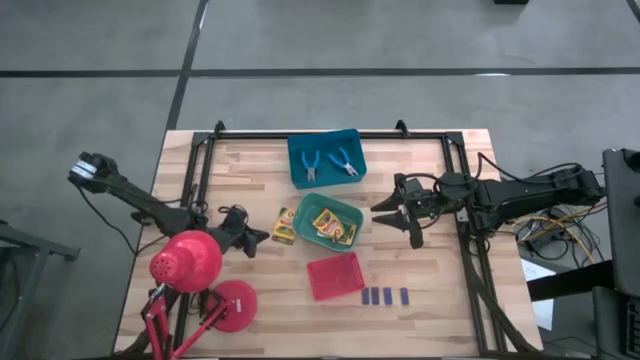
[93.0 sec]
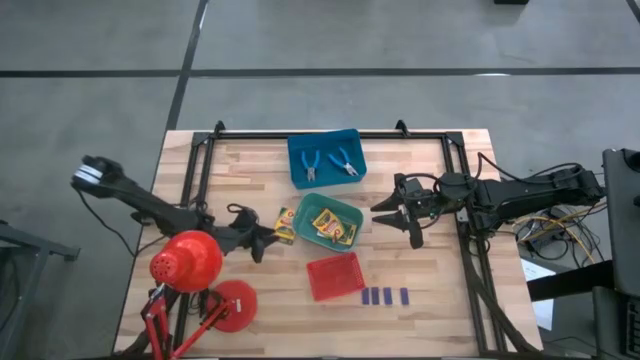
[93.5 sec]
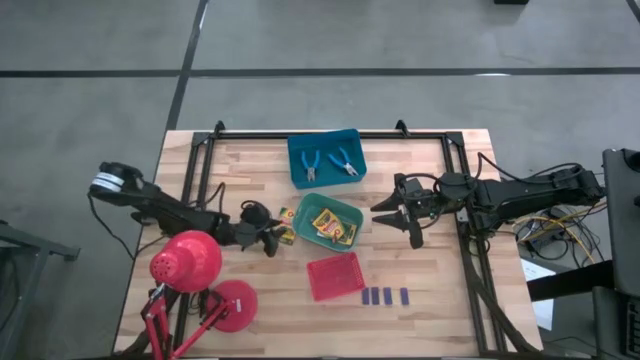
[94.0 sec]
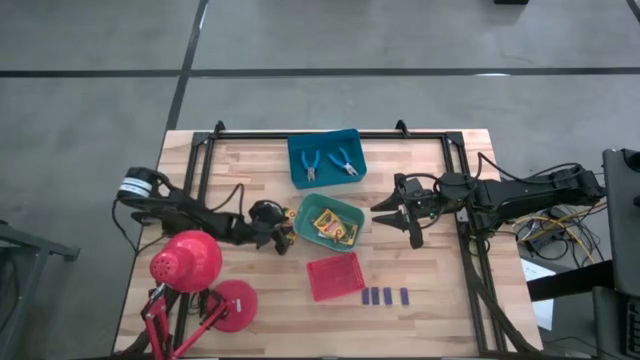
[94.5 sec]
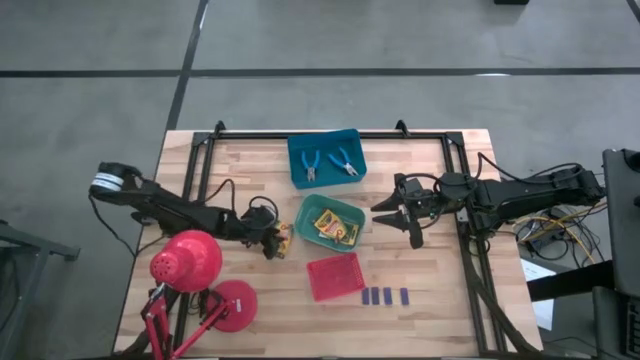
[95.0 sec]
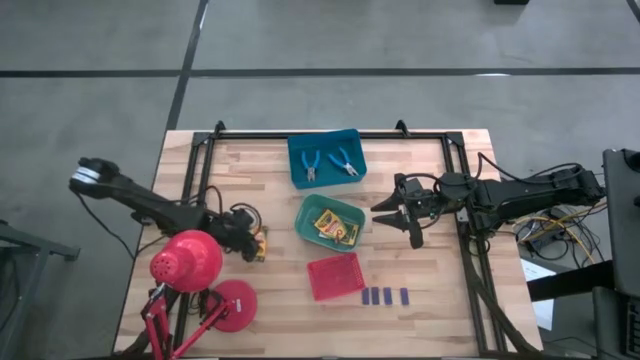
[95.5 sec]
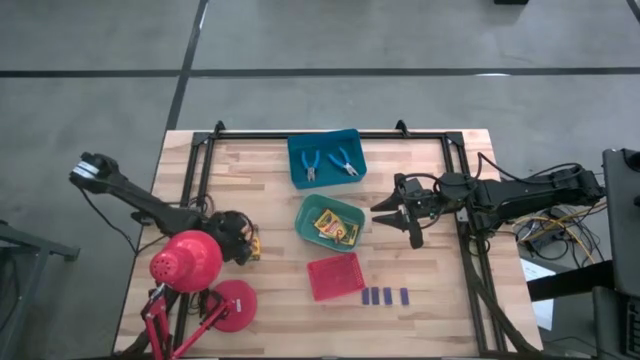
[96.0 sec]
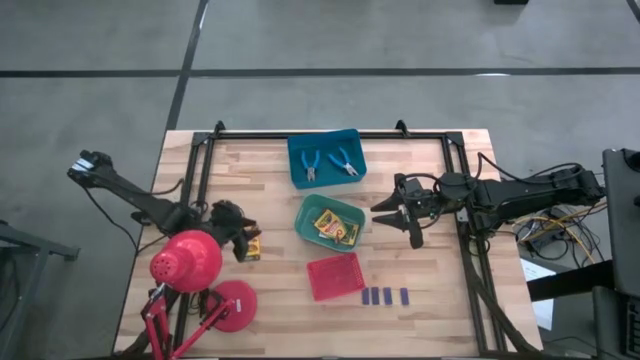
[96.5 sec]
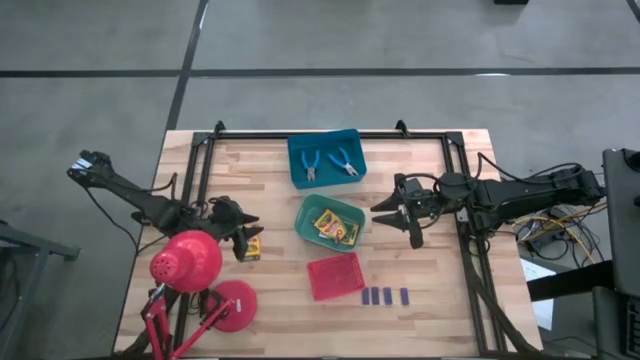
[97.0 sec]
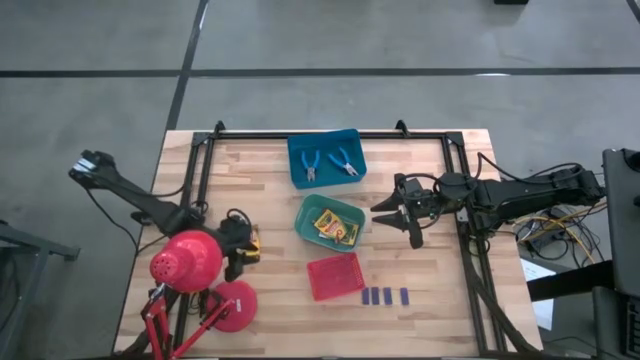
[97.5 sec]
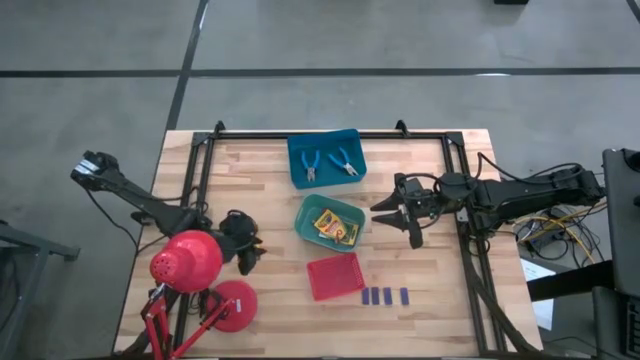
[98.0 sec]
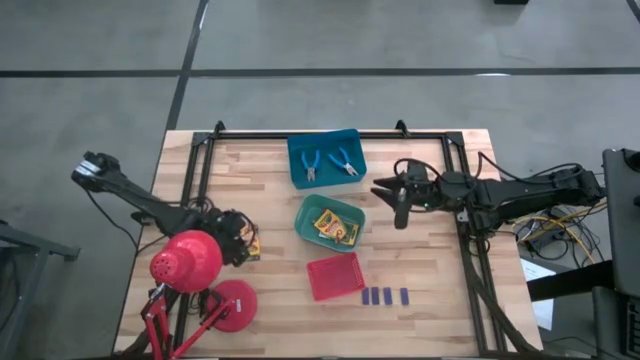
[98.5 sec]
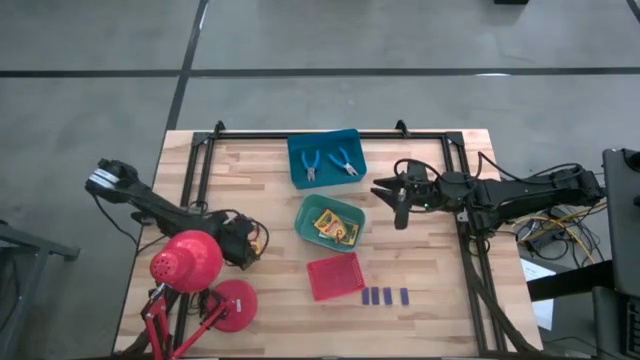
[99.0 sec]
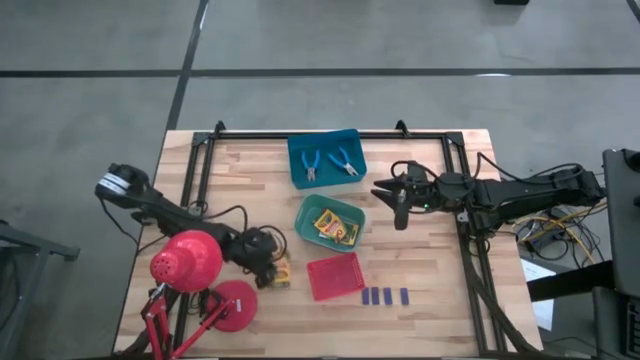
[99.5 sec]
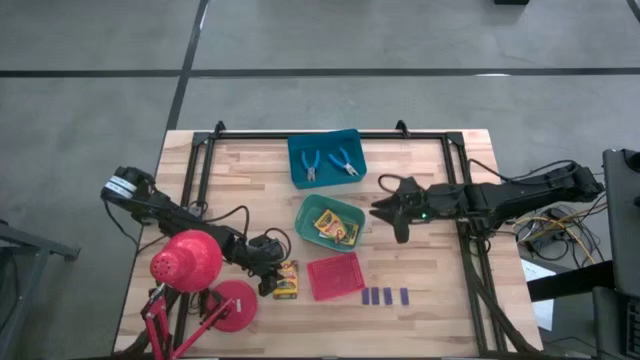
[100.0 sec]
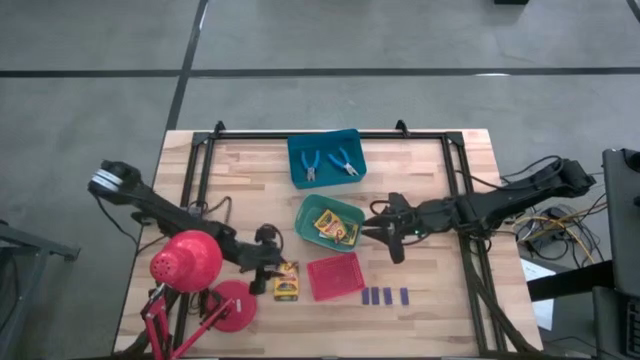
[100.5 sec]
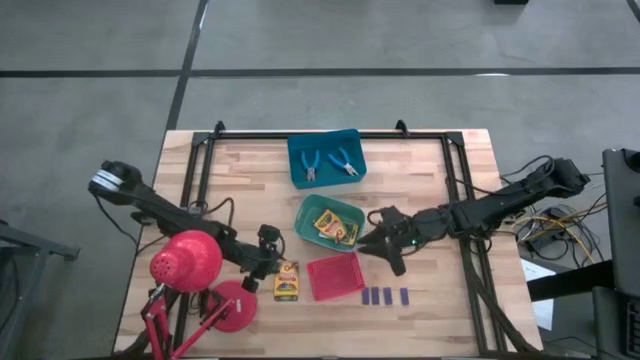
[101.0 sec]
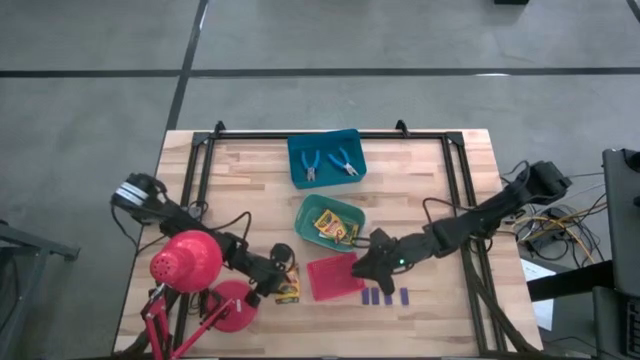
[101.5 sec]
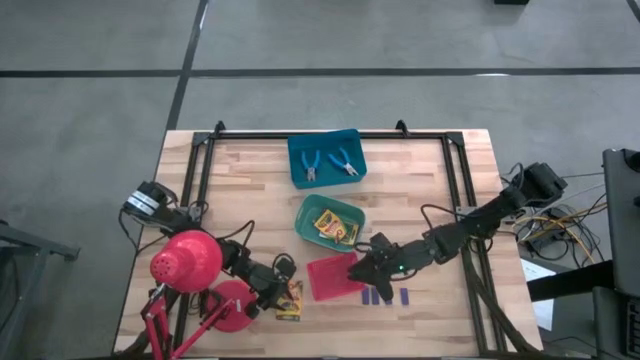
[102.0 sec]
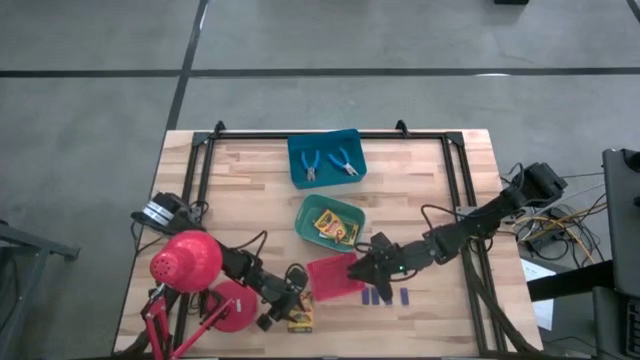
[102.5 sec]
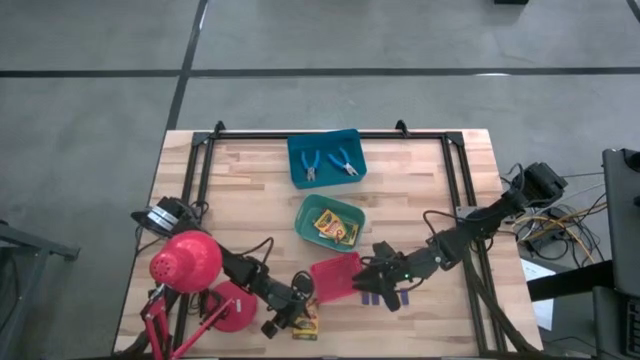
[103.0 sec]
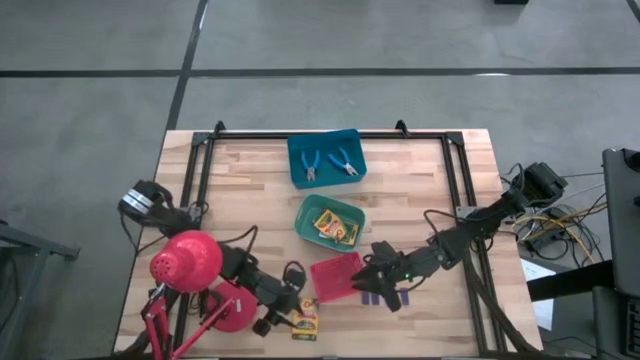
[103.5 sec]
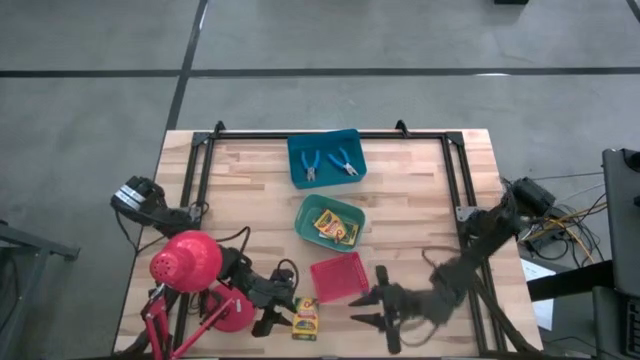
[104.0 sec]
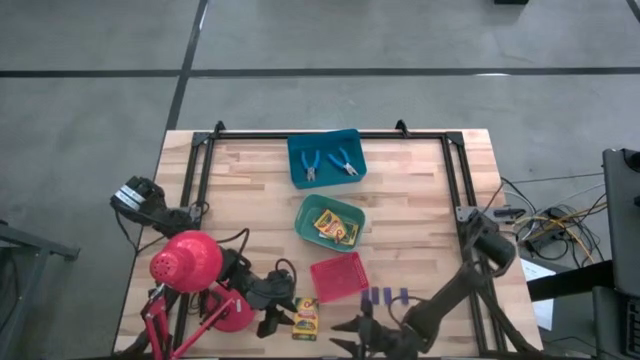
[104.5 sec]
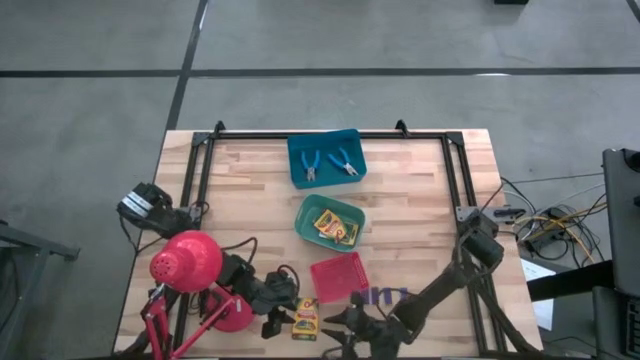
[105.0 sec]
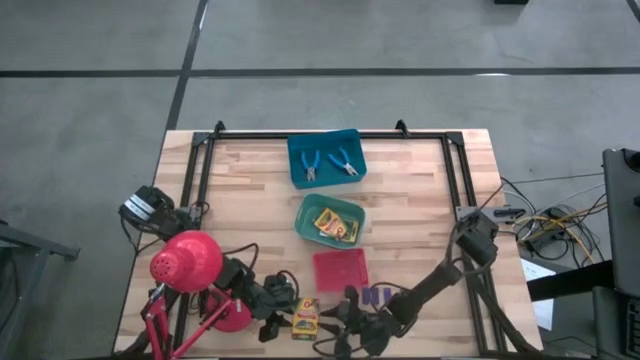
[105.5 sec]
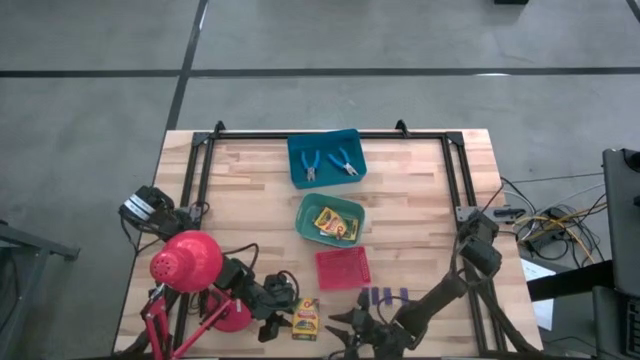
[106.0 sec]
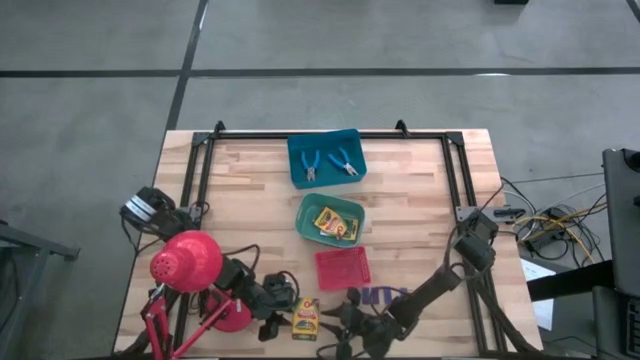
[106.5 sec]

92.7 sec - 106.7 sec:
Task: Pick & Place School Supplies
Put the yellow crayon box in the green bin
